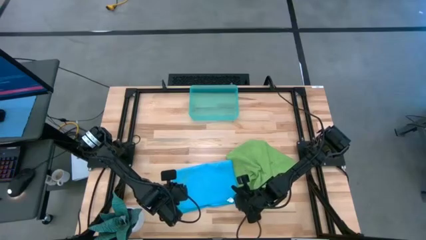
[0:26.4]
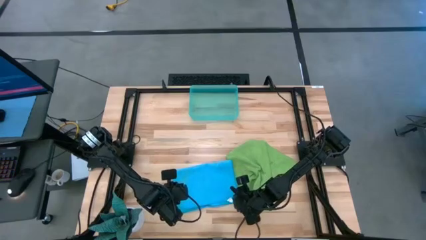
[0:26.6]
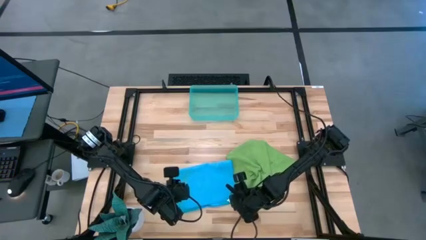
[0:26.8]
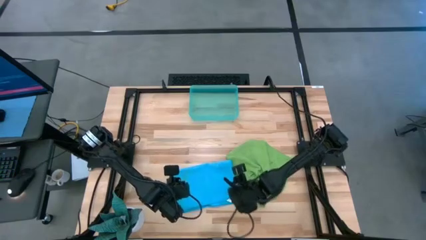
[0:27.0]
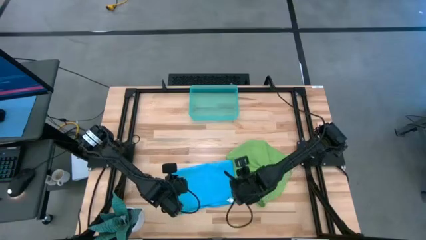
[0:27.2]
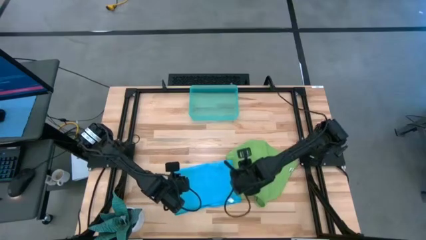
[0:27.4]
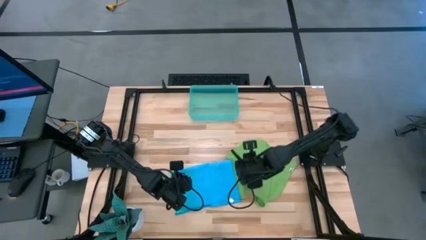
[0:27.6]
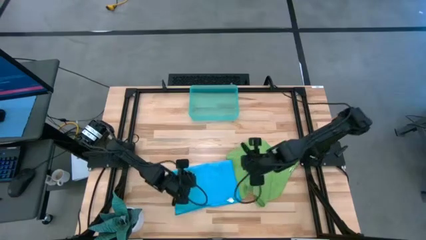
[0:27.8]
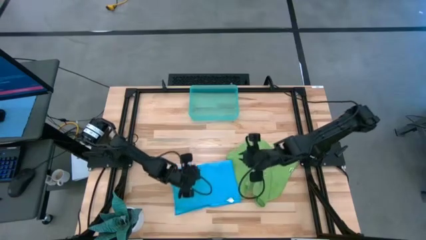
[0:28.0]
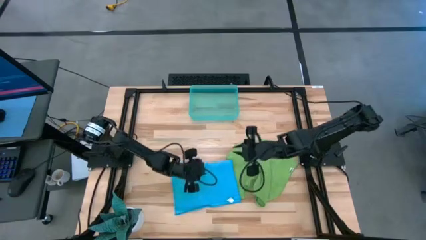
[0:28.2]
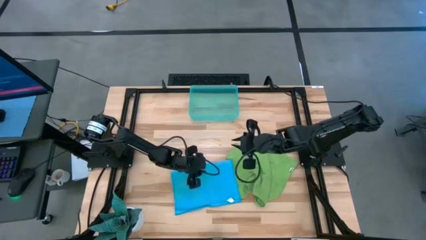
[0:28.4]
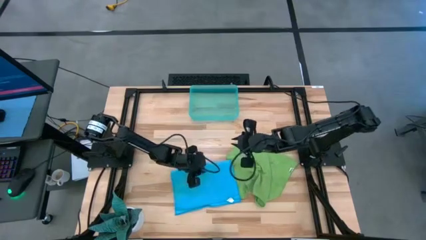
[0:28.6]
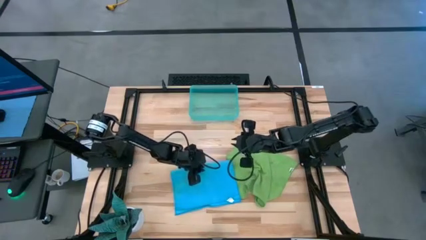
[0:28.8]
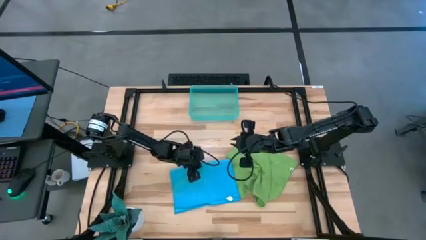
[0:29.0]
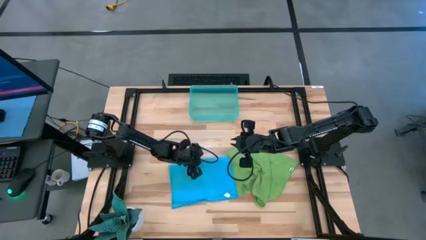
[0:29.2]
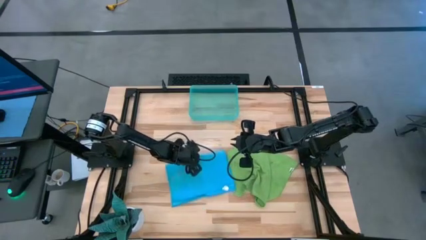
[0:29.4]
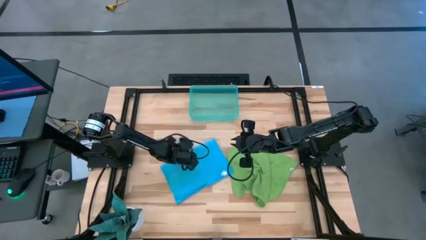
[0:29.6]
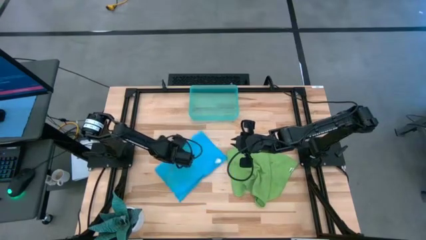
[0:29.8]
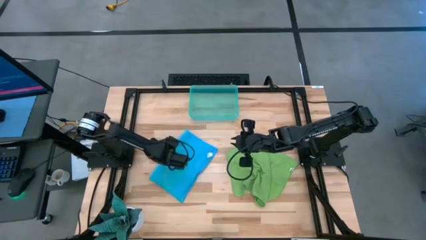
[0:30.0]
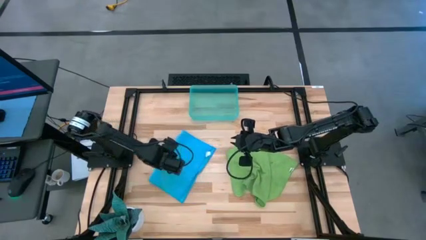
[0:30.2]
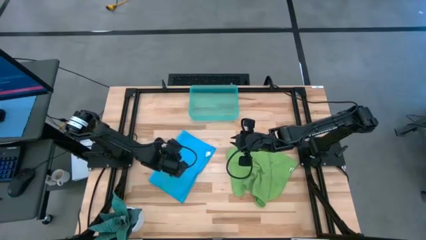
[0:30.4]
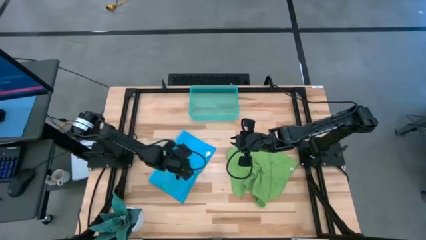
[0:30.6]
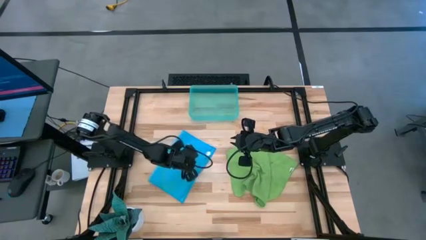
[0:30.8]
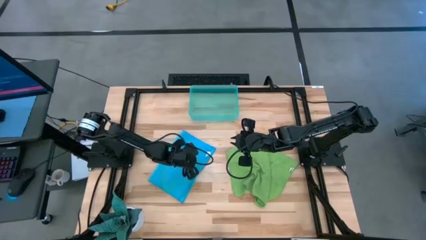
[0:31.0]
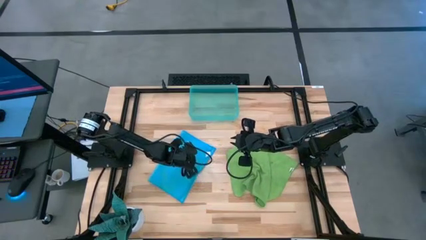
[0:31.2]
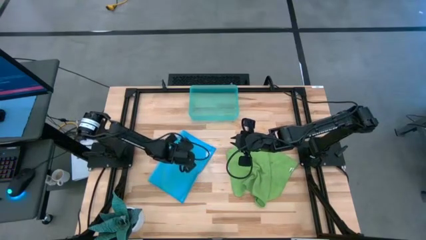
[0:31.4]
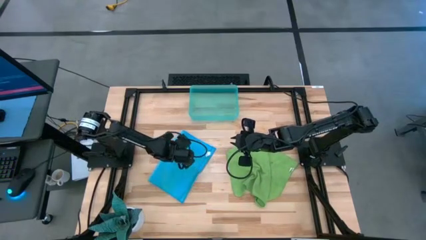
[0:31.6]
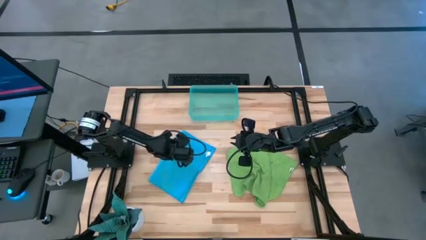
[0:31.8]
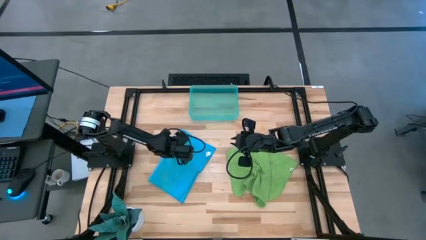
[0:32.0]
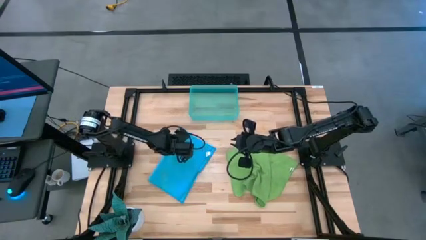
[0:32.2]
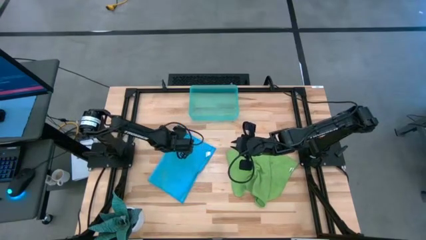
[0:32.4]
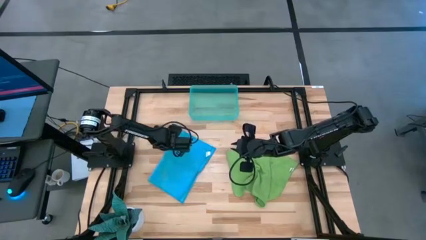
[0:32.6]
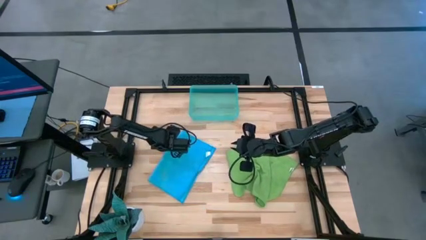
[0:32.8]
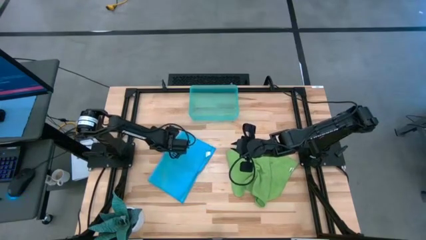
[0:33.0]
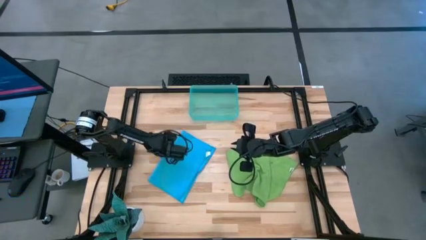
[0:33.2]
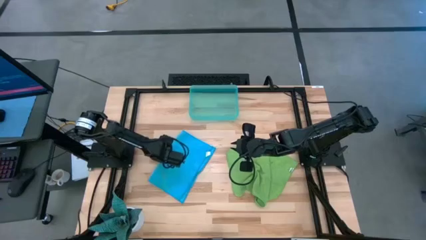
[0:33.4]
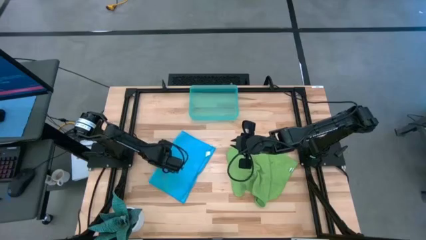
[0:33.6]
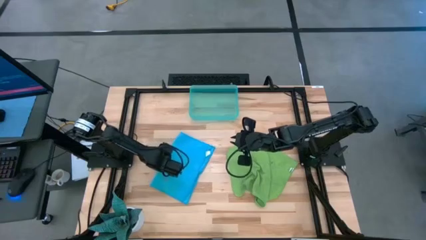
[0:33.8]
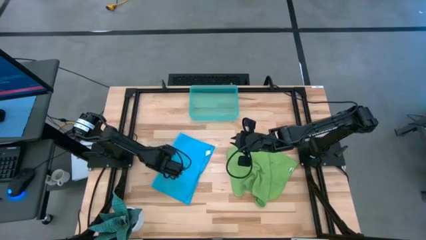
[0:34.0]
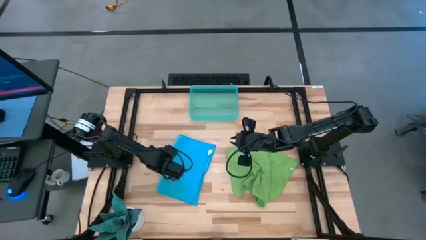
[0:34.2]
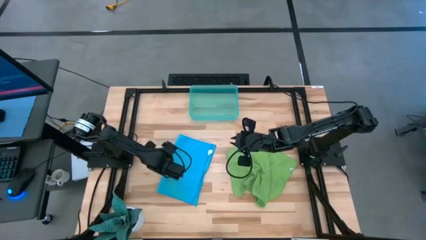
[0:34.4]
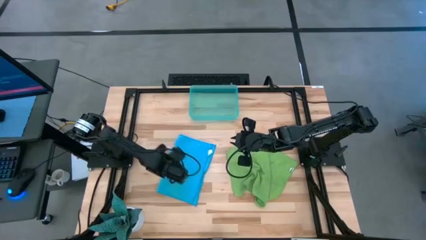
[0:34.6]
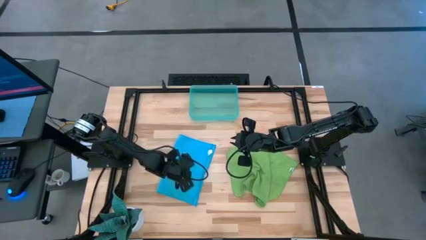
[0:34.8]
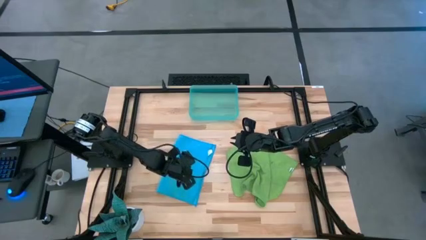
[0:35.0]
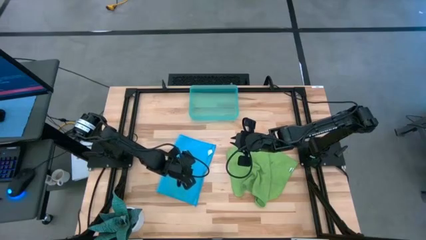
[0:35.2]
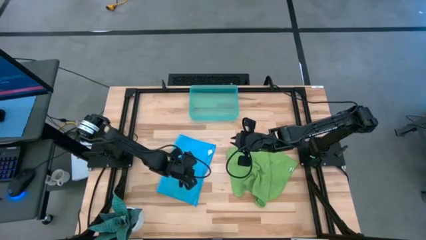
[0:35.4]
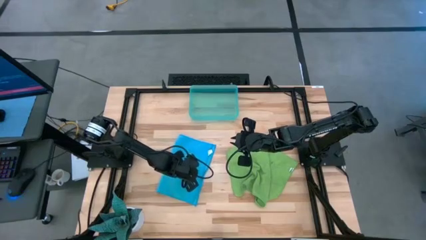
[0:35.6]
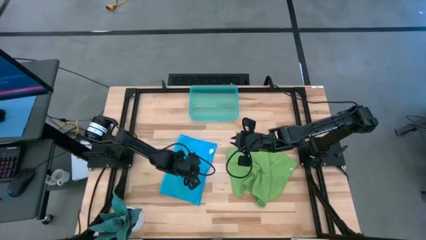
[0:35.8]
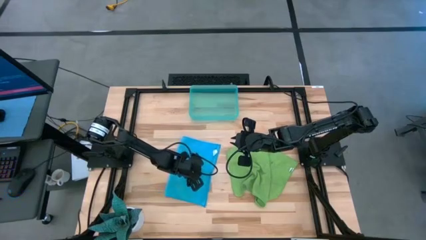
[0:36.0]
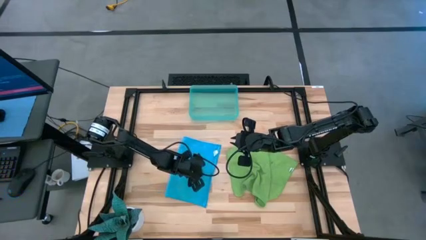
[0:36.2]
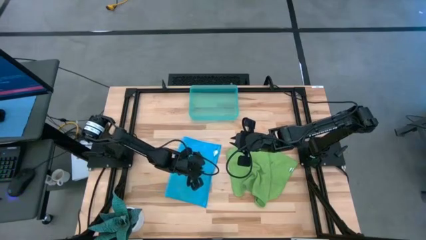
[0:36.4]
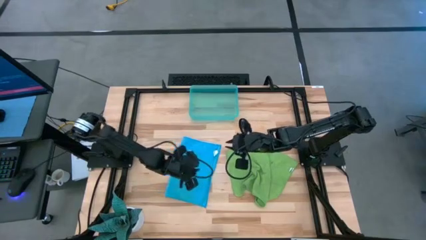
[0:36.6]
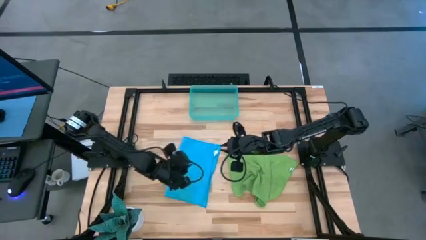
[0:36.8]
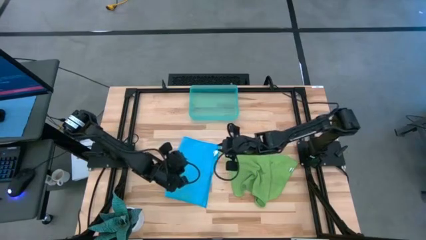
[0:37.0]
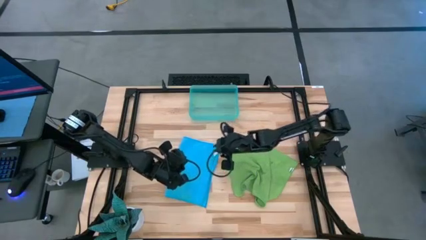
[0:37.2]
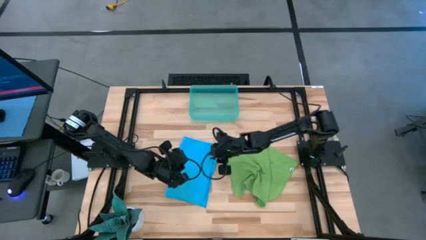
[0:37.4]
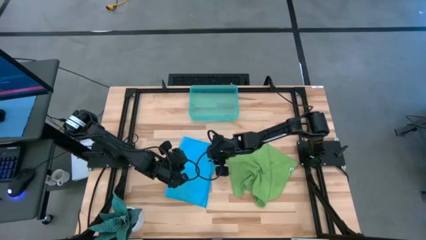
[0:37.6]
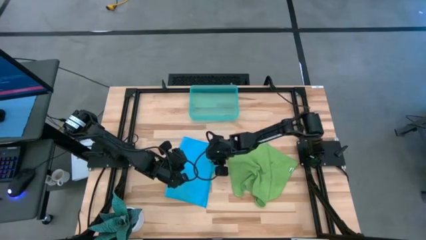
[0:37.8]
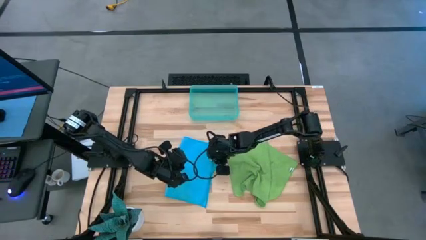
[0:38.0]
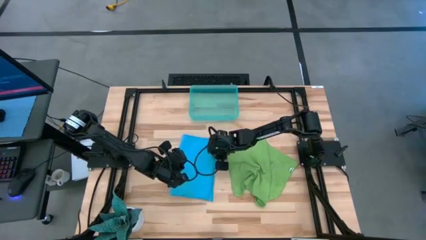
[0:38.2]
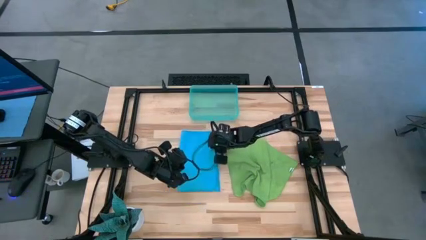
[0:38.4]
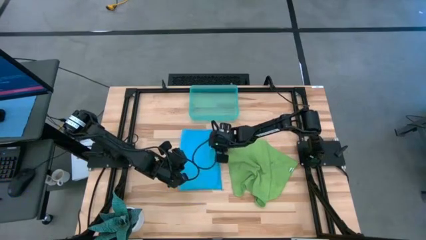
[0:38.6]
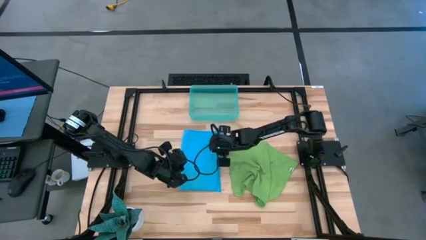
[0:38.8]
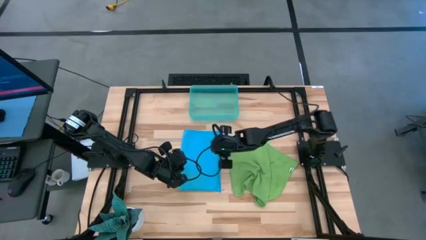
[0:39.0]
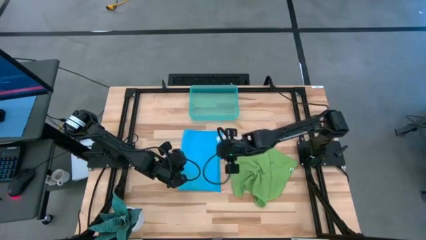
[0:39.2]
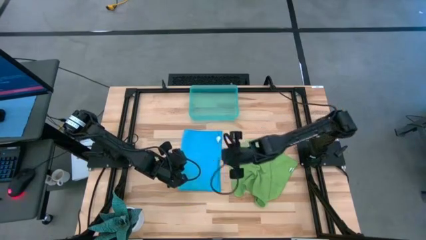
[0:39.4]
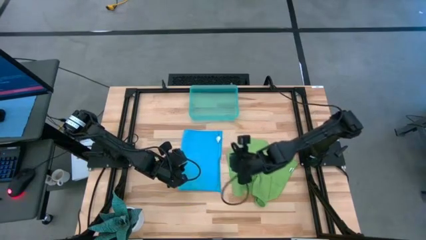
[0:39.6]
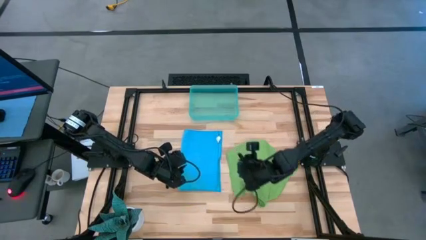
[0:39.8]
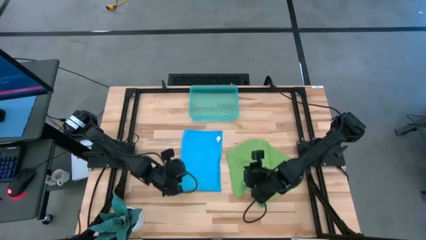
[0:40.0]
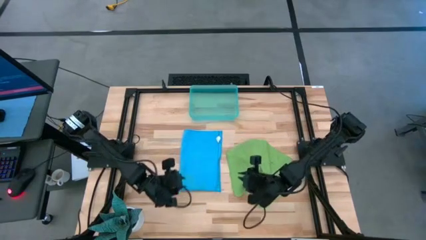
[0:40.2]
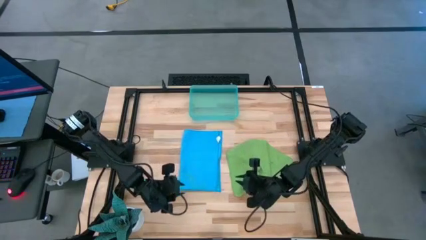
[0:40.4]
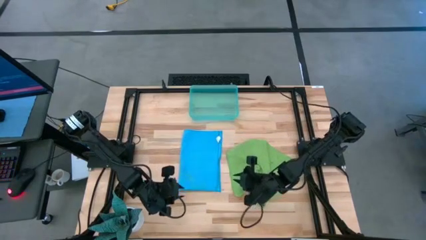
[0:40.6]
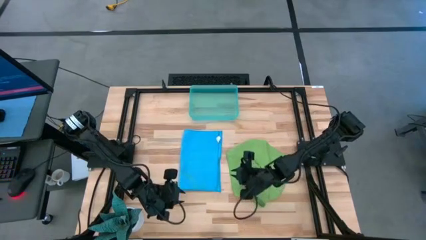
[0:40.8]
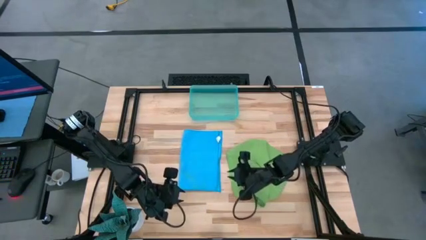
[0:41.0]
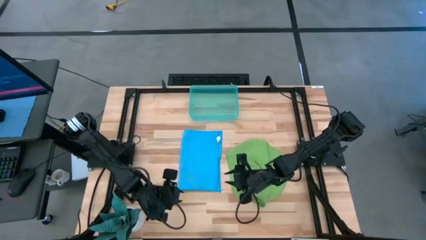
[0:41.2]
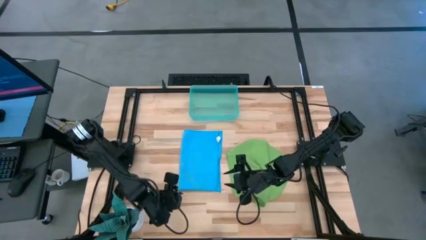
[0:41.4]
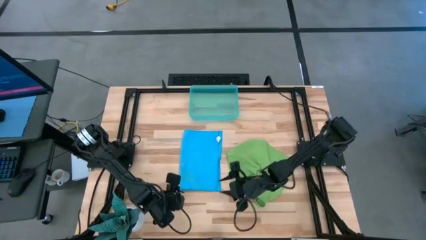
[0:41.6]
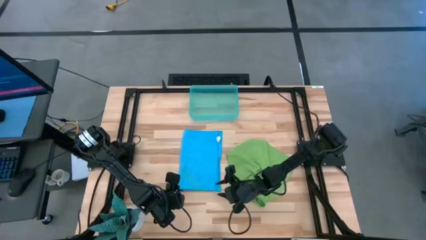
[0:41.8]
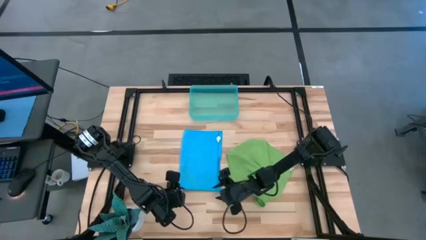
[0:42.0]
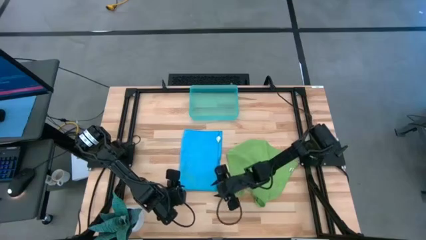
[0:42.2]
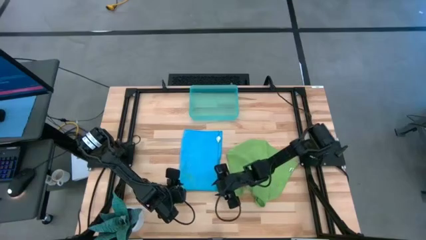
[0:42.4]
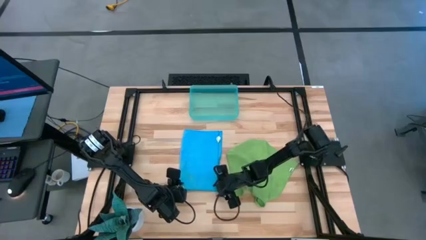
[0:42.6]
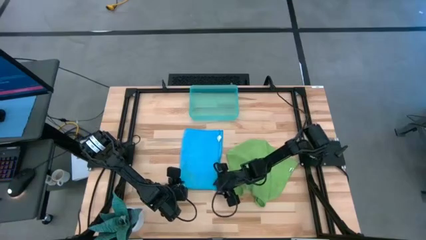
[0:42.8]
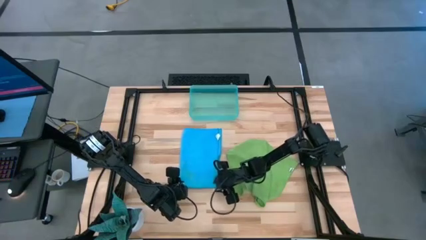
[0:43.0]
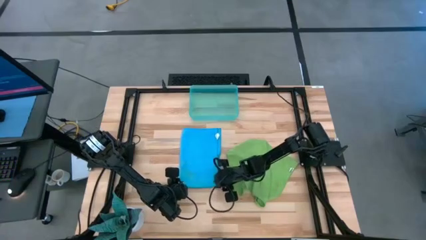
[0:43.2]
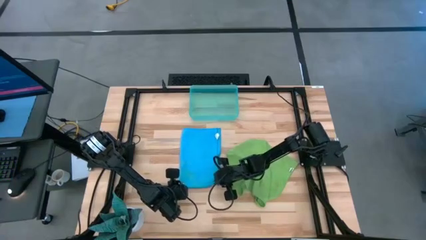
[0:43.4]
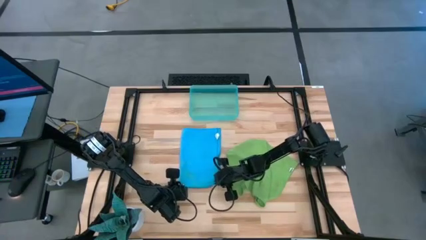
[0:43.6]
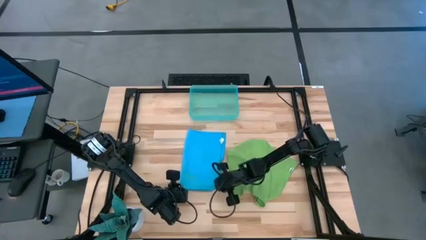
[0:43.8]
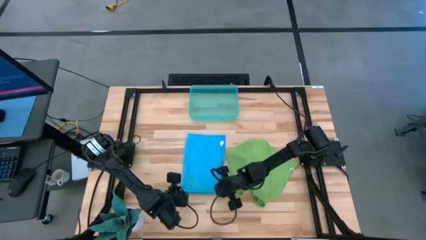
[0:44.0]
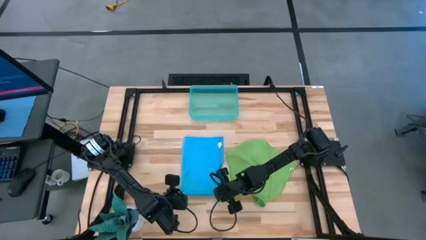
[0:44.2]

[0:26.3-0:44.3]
Task: Roll microfiber towels into tight, uniform cylinder then place into a basket
Roll the blue microfiber cloth
